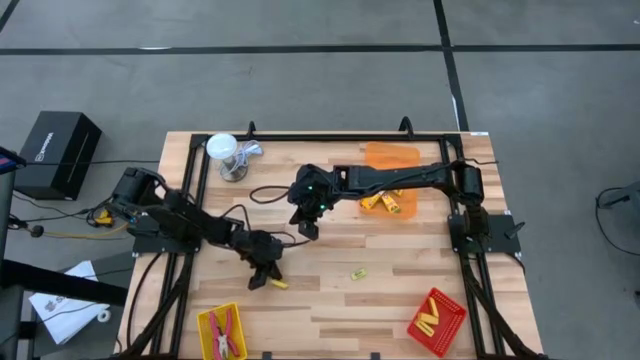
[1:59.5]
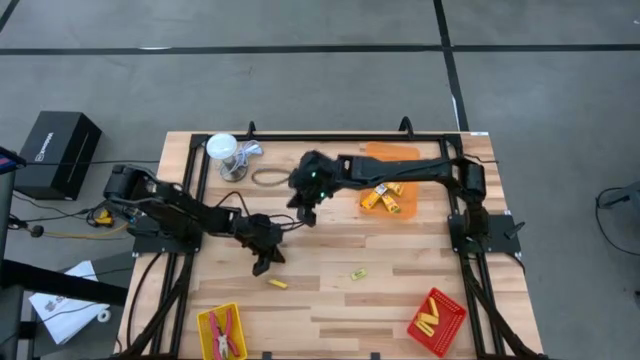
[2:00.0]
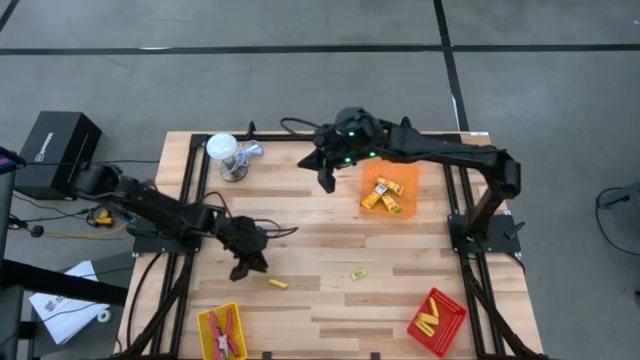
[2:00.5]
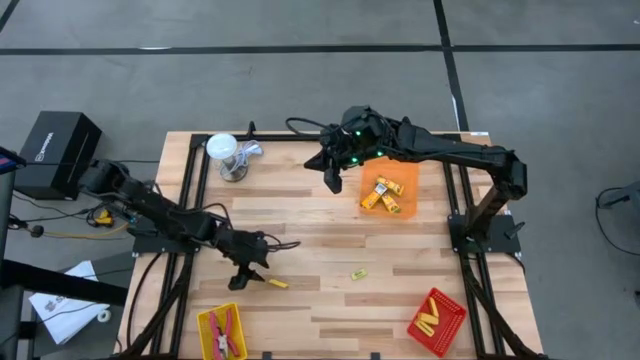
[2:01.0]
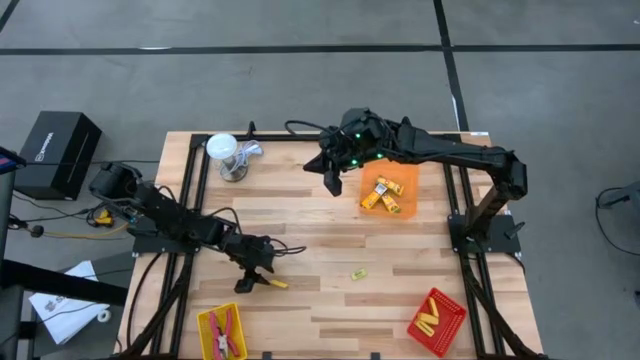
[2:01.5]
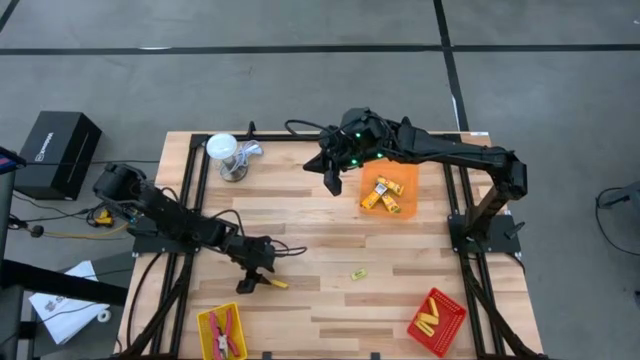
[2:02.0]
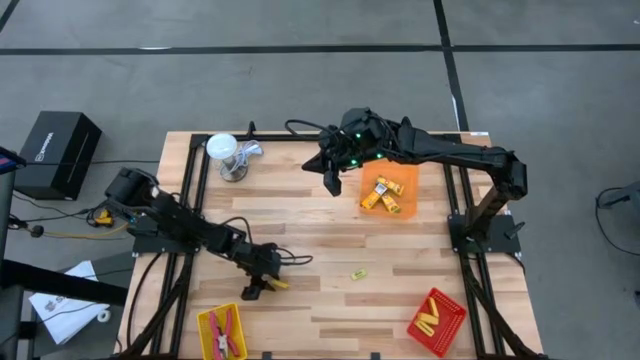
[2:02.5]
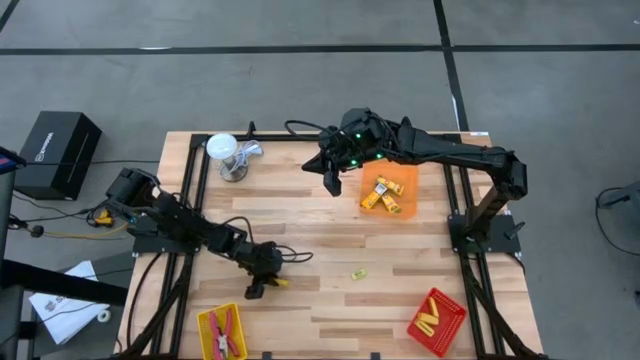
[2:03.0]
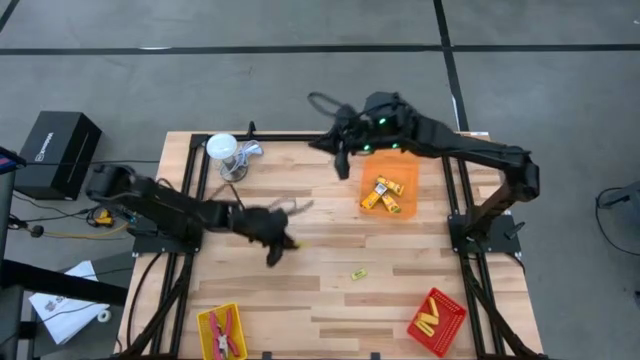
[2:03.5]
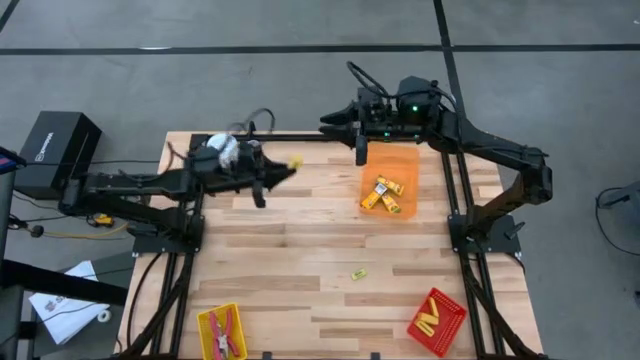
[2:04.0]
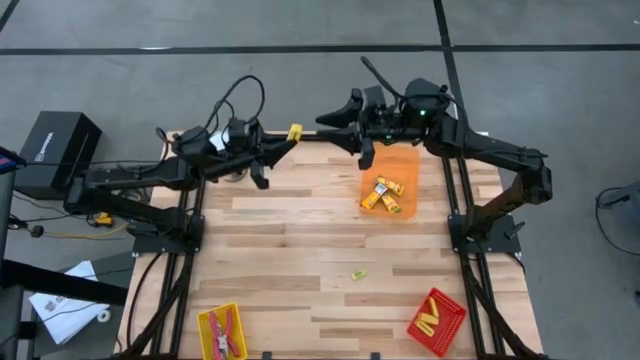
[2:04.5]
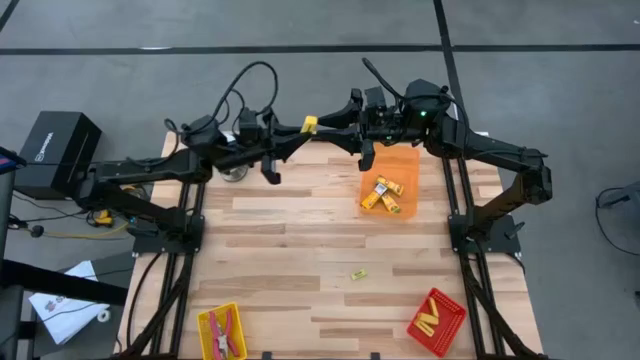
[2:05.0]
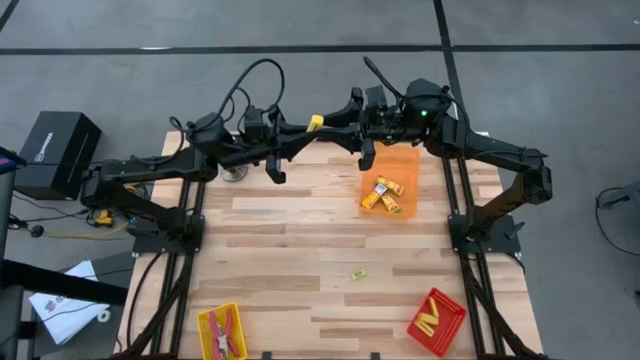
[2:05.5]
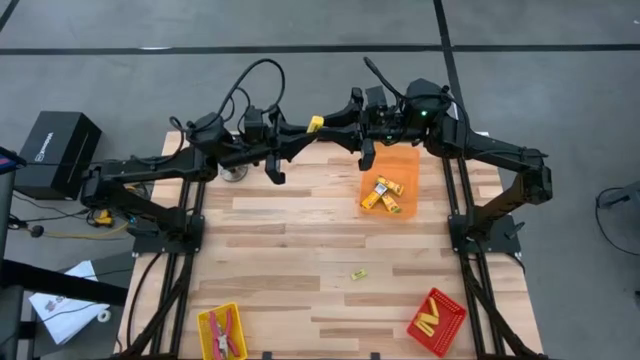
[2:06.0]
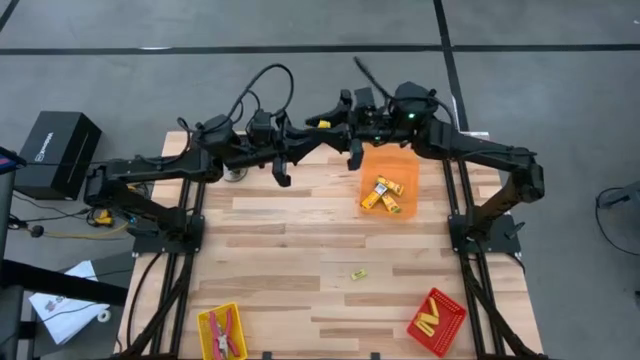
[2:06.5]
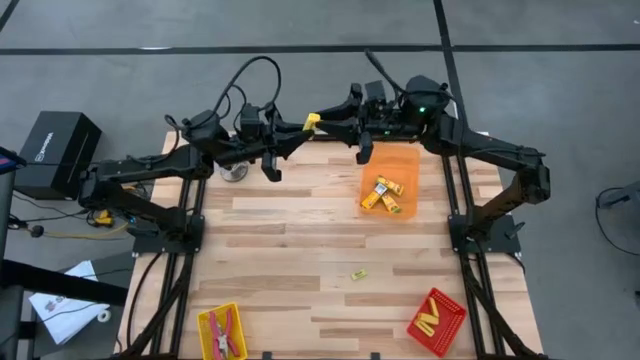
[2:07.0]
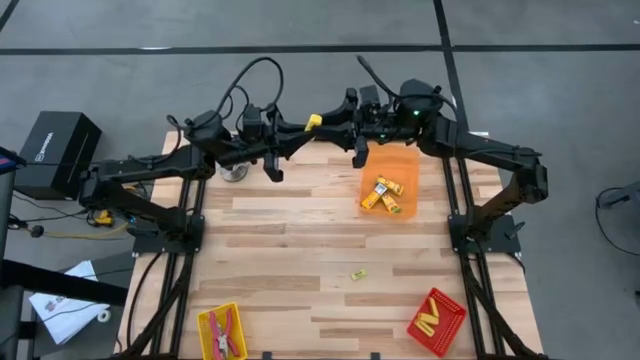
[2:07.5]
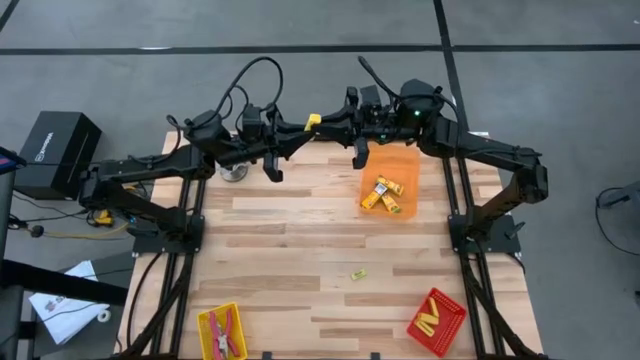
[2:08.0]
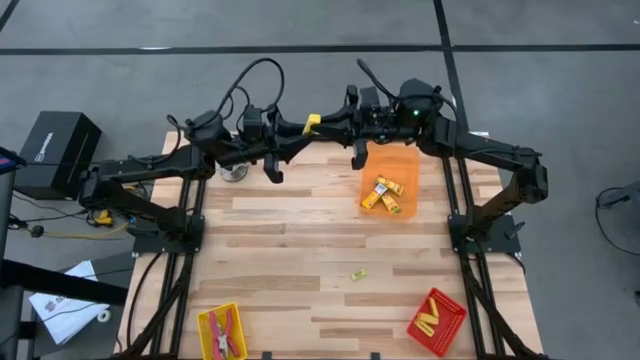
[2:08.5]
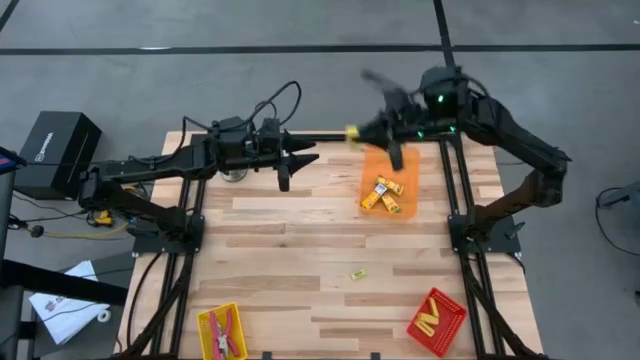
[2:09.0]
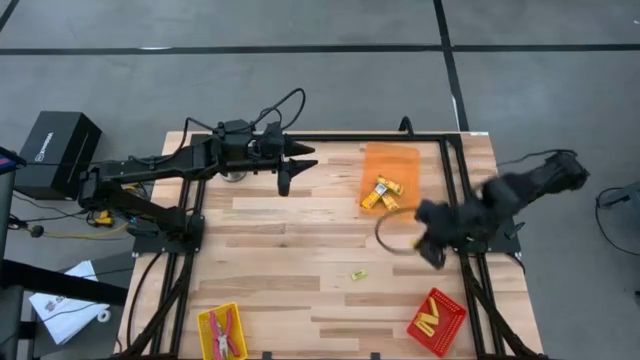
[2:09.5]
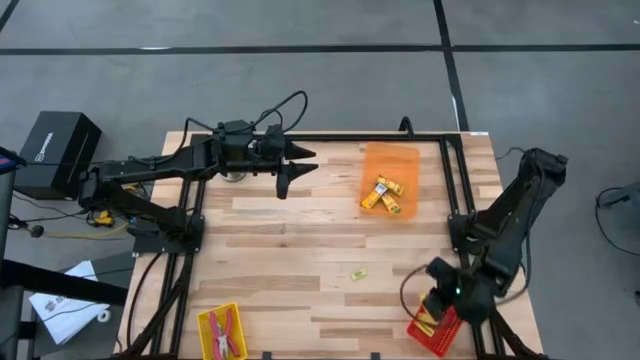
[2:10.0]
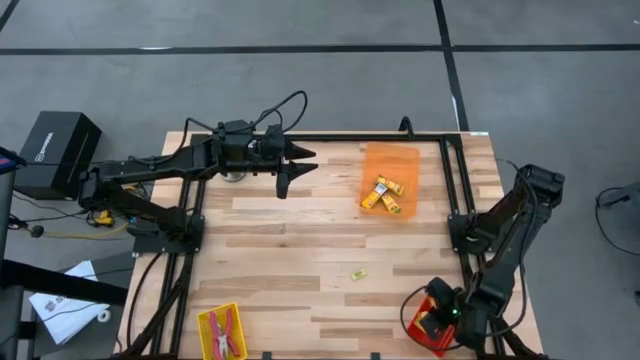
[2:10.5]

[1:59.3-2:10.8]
Task: Pick & Place School Supplies
Put the yellow eraser into the red bin

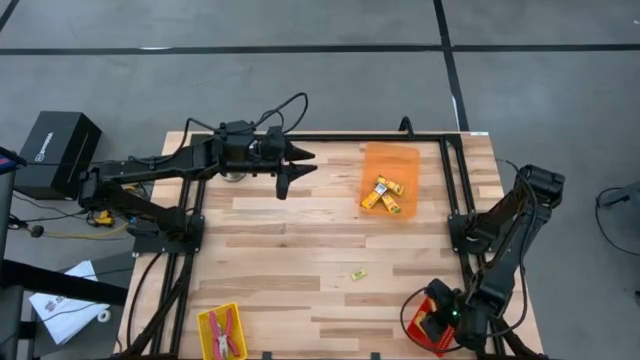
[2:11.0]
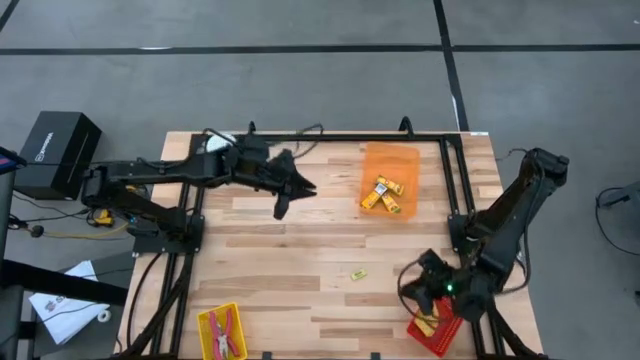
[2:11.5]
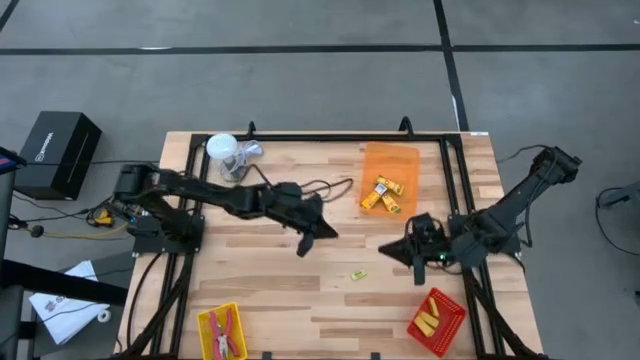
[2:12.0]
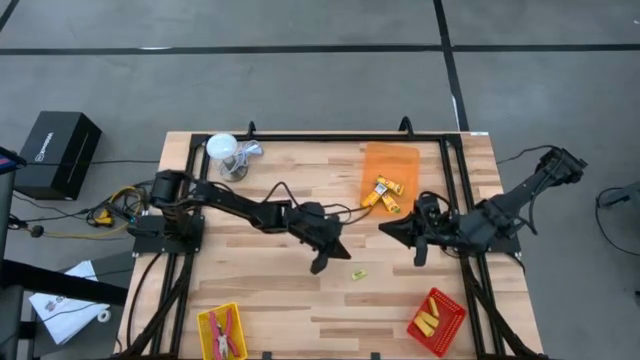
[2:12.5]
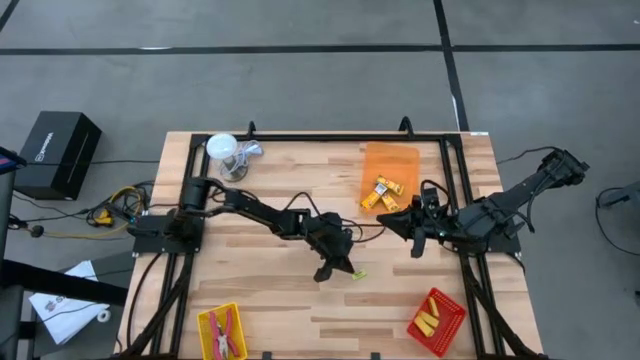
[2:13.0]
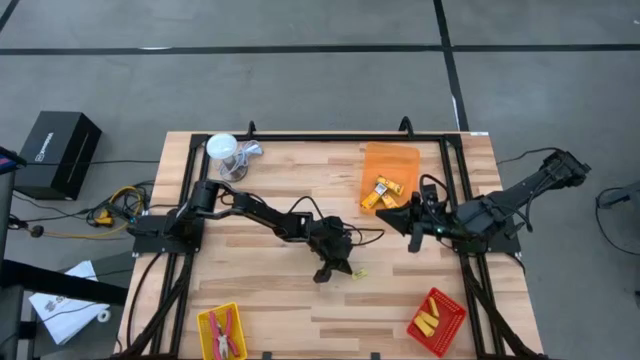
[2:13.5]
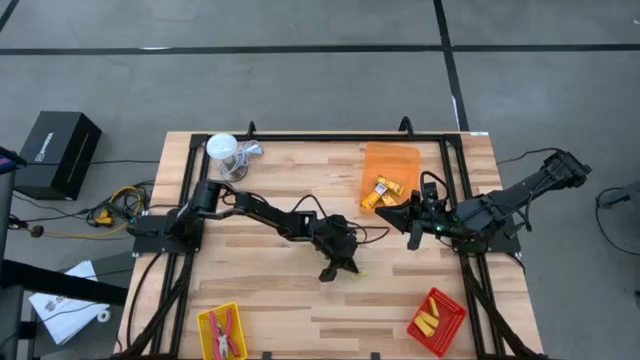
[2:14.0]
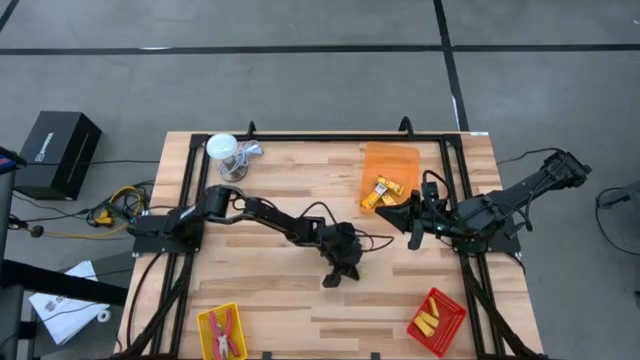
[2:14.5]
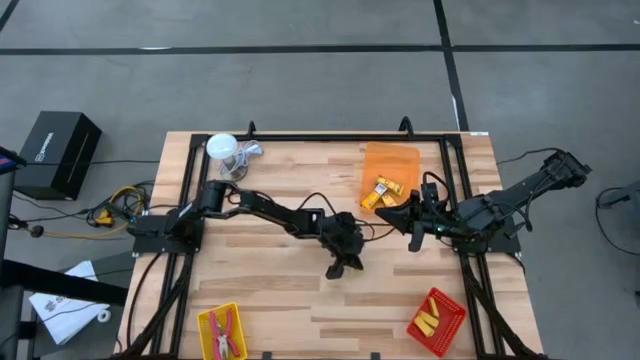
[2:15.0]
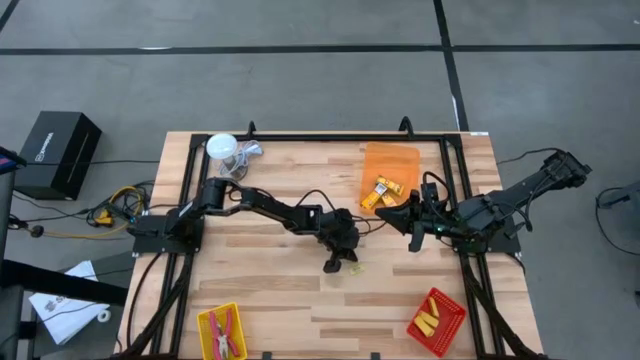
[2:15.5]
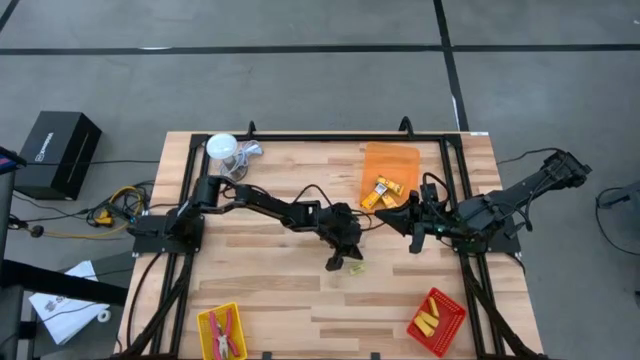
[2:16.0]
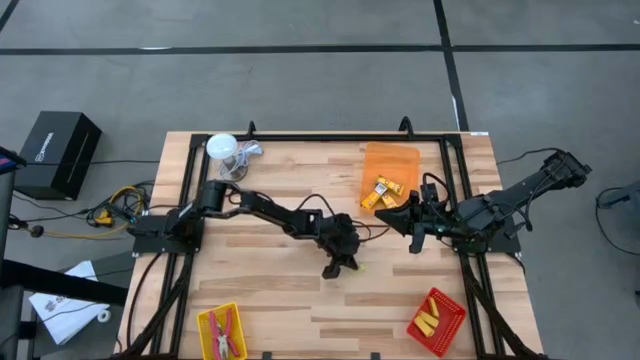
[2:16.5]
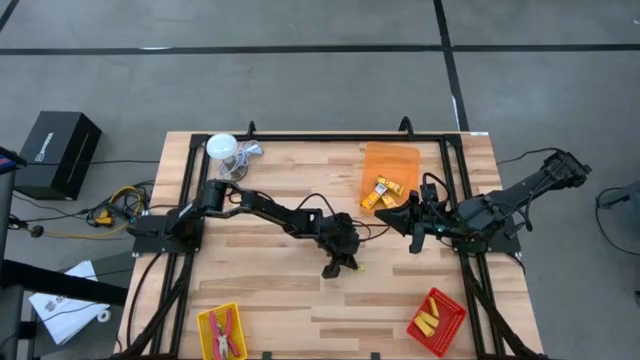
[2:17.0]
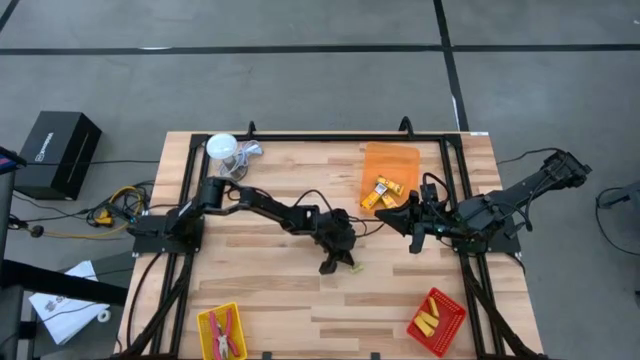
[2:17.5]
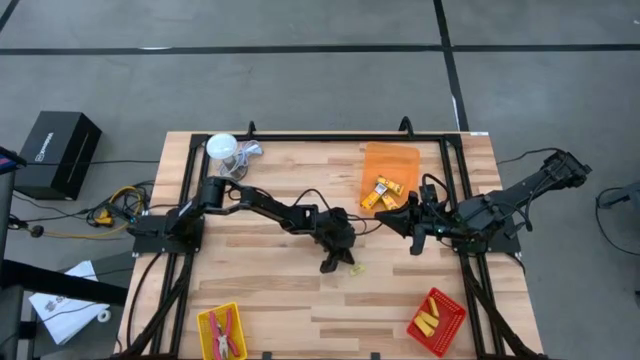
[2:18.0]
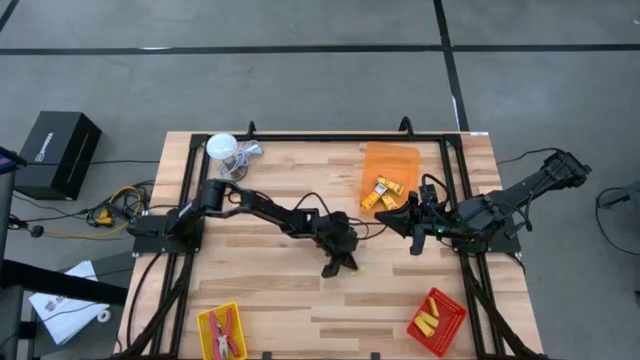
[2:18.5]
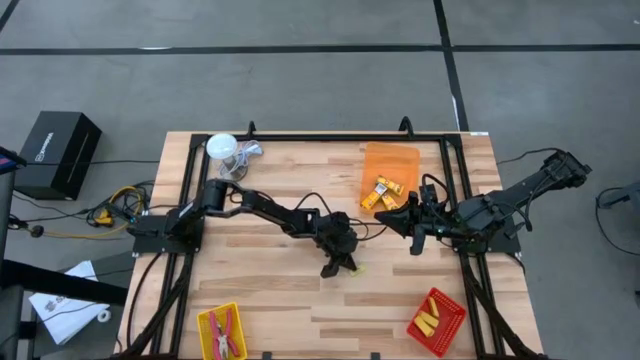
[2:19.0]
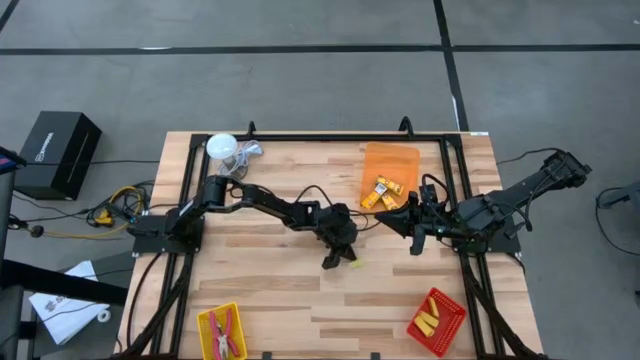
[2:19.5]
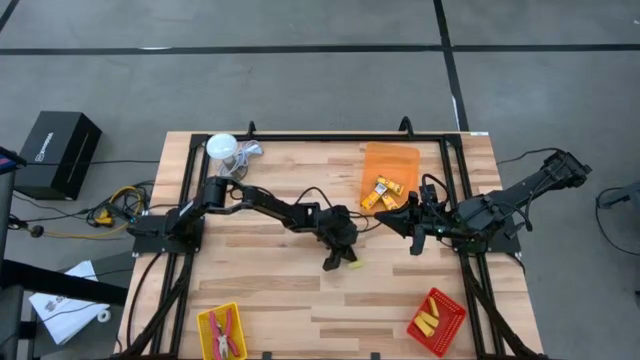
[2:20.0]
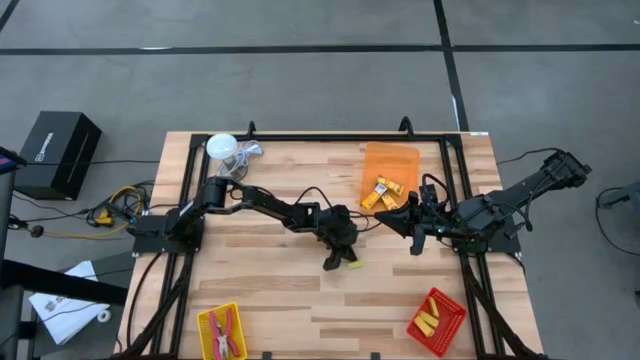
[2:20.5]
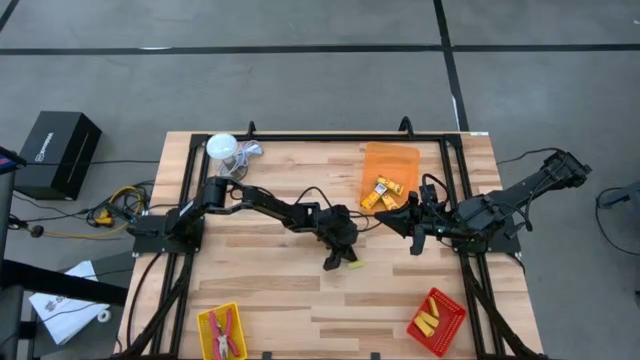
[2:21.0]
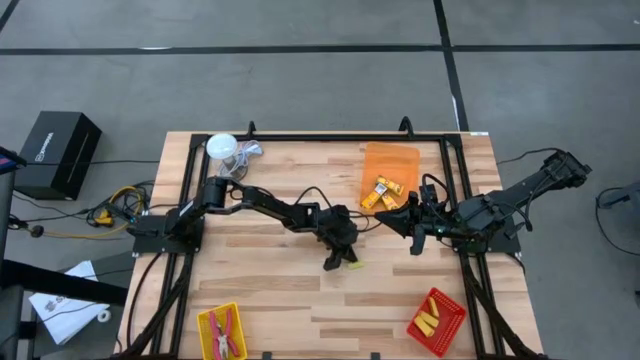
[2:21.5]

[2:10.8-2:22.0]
Put the eraser into the red bin
